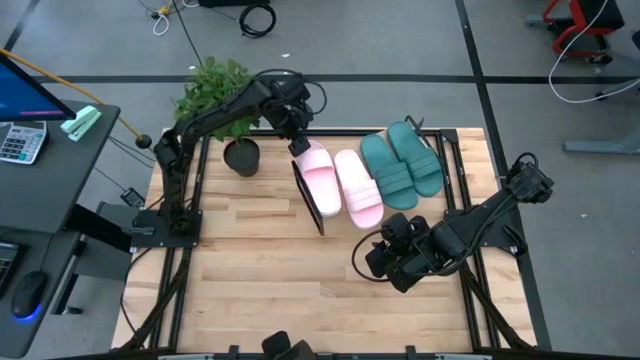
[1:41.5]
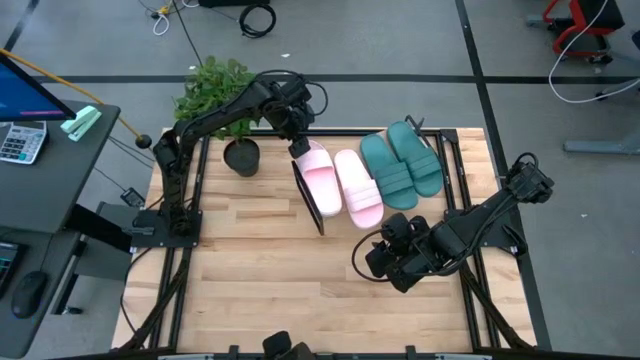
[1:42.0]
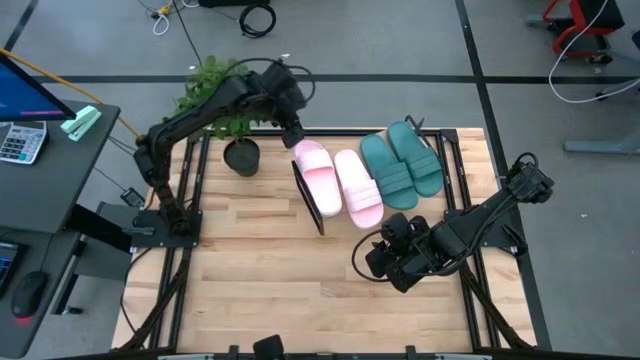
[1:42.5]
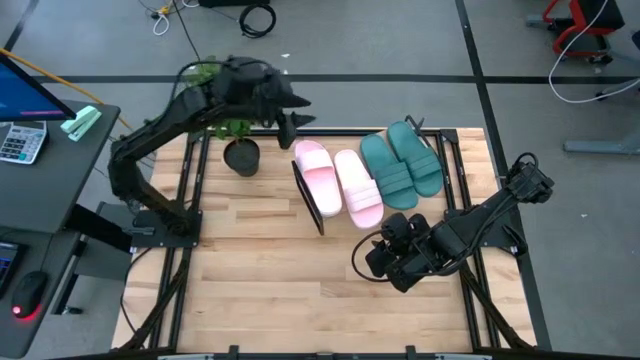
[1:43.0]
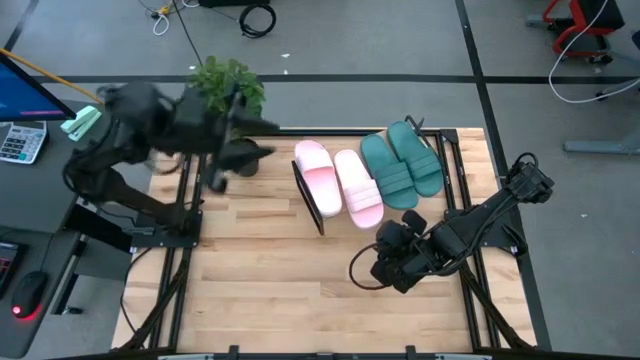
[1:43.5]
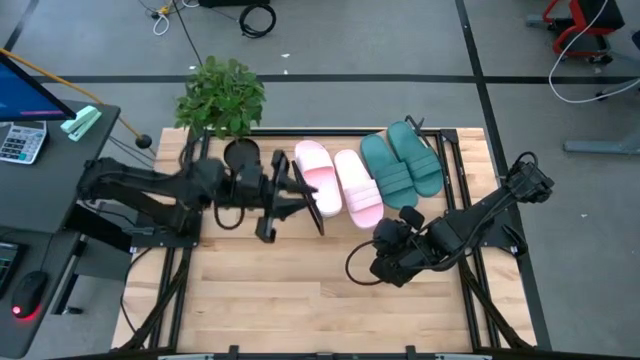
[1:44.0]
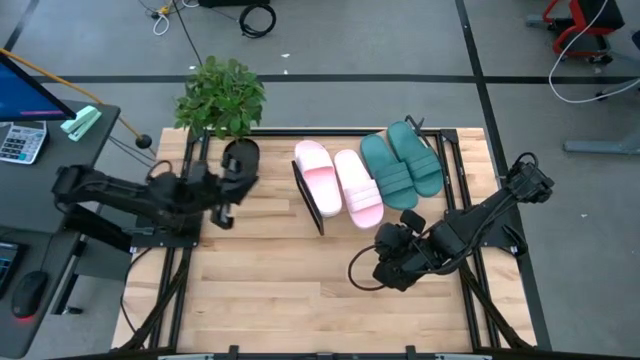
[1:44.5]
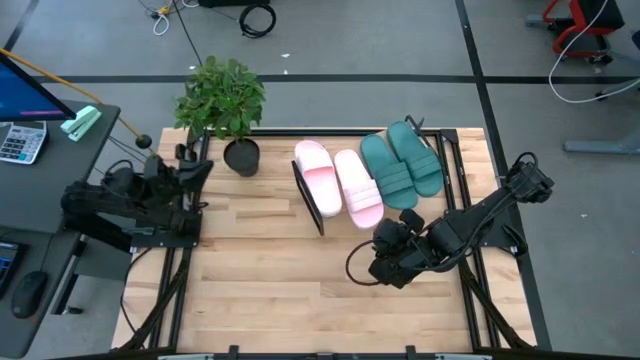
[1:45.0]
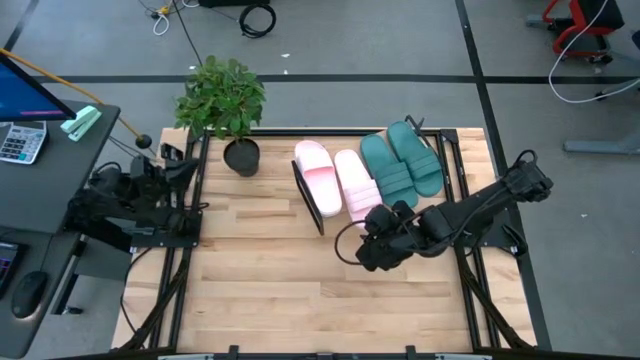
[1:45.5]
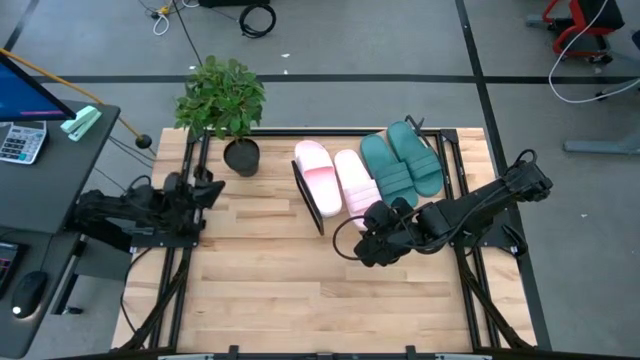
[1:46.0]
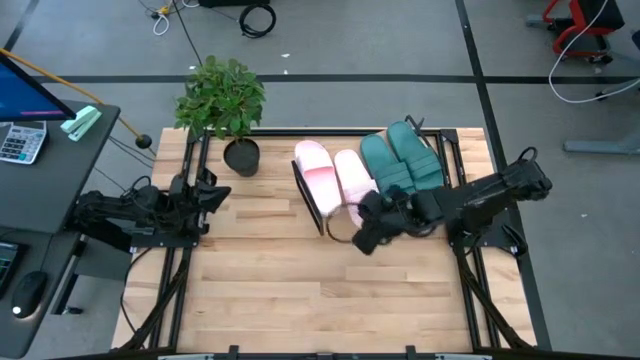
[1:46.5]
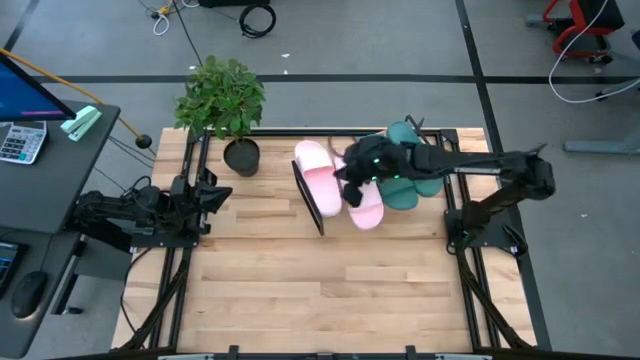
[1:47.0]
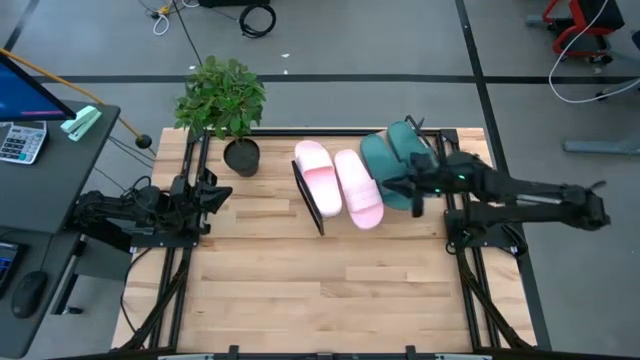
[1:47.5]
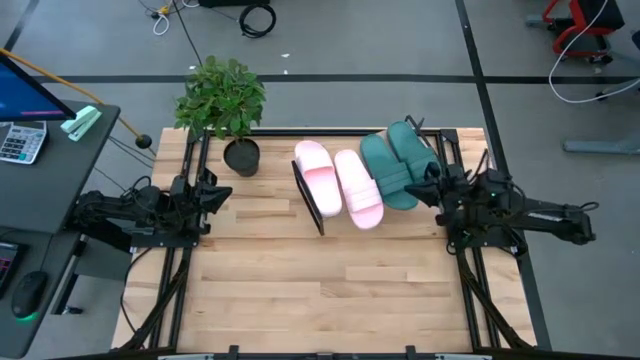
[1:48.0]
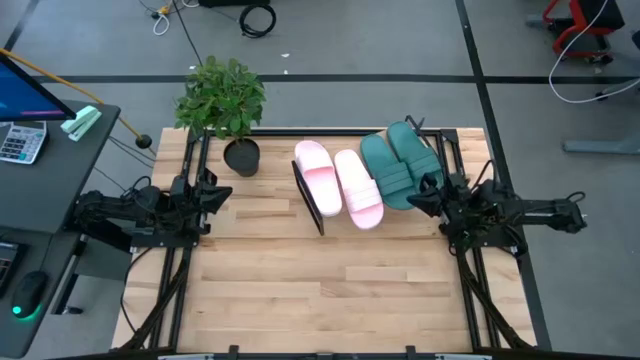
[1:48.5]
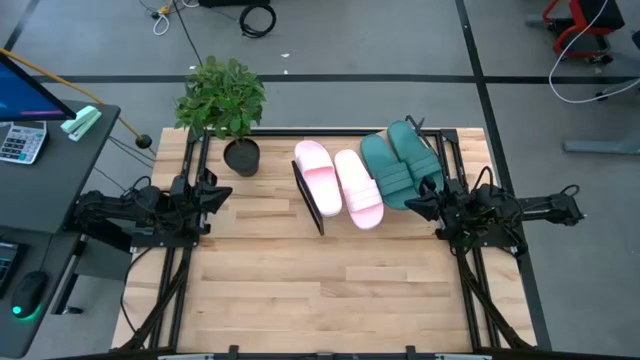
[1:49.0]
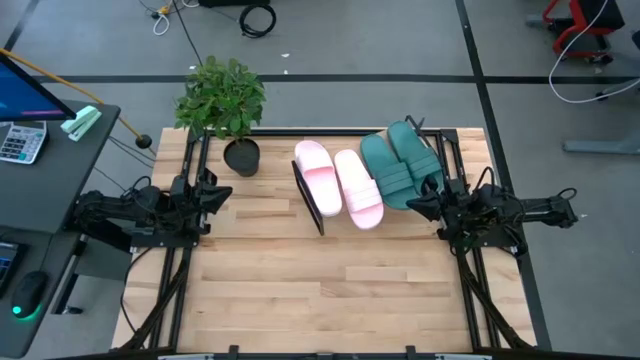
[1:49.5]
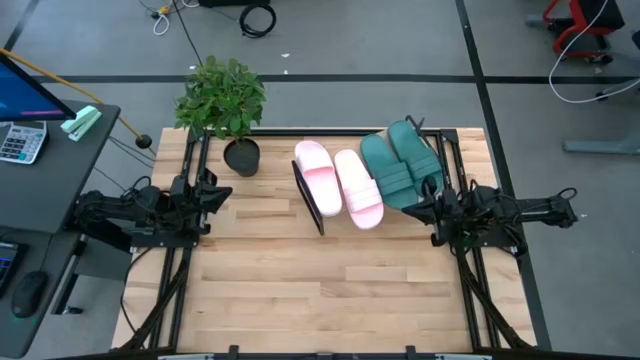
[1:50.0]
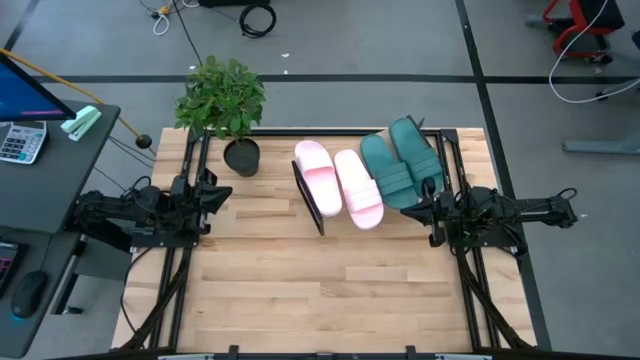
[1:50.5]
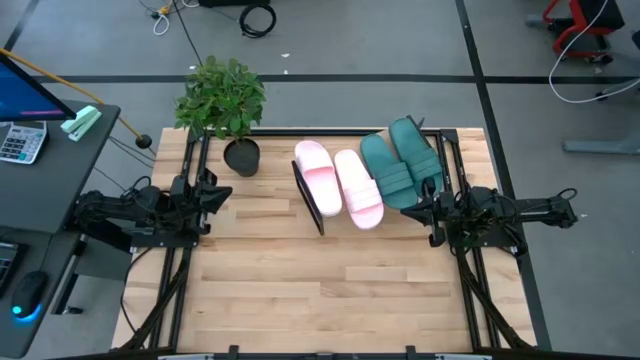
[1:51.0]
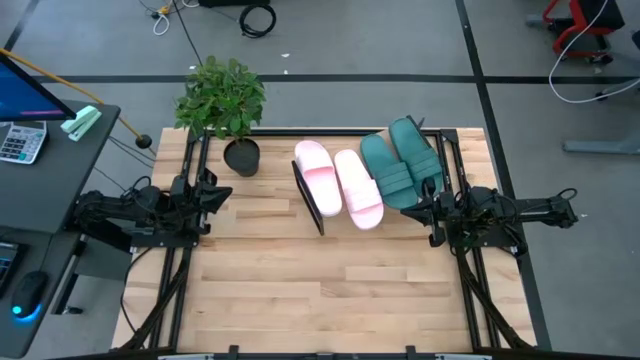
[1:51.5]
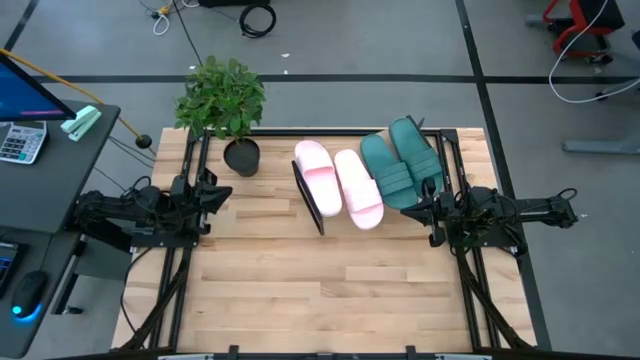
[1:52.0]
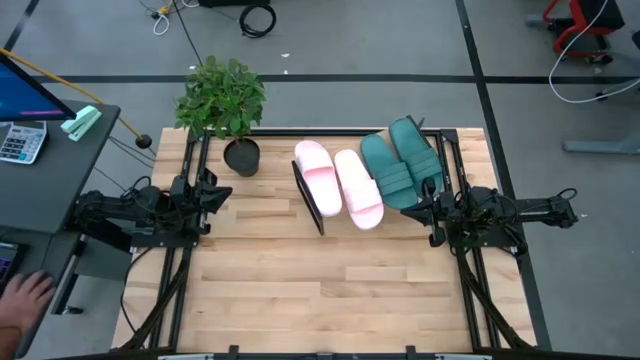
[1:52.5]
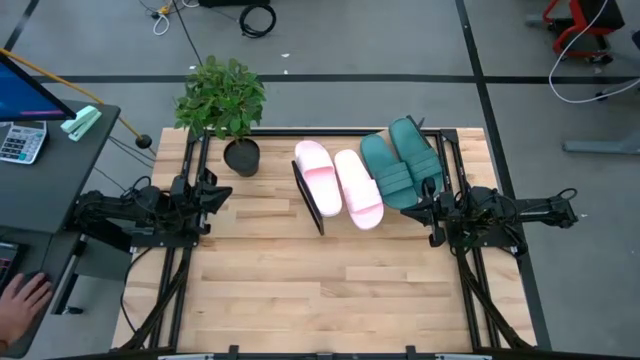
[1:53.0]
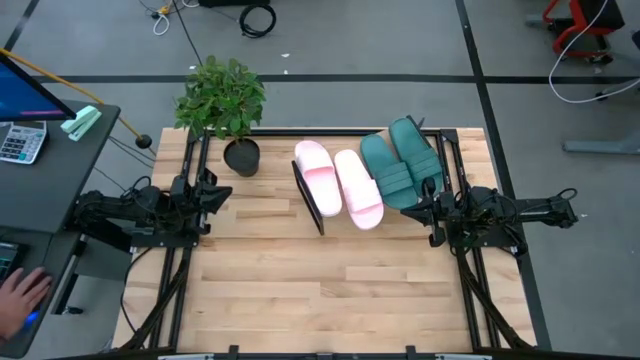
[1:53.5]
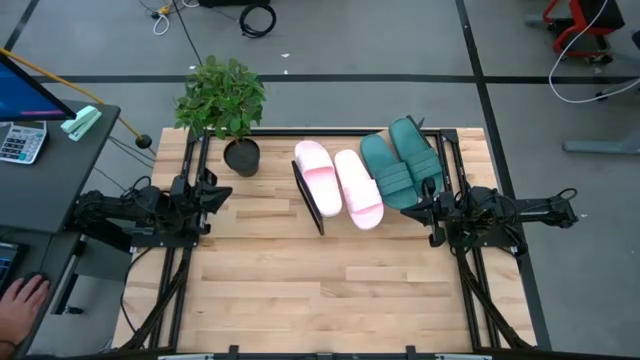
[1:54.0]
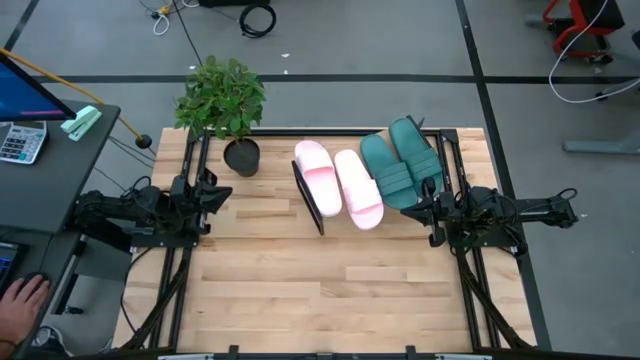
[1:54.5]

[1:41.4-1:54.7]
Task: Pick and place slides into the shelf
Return to Home Position

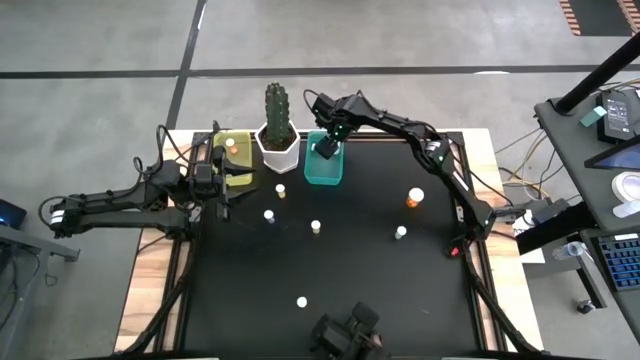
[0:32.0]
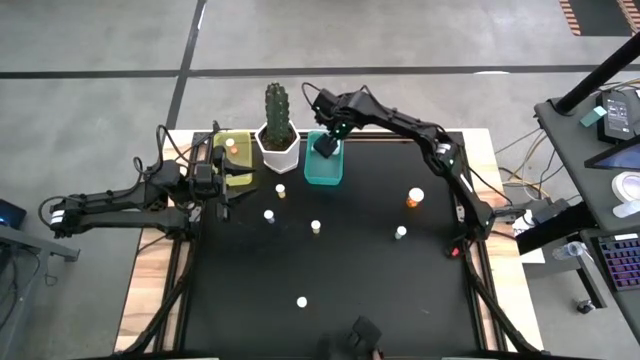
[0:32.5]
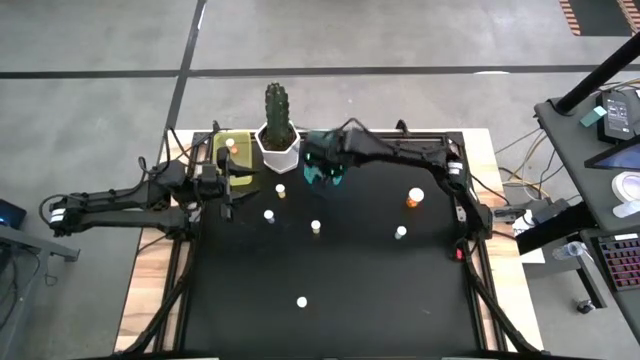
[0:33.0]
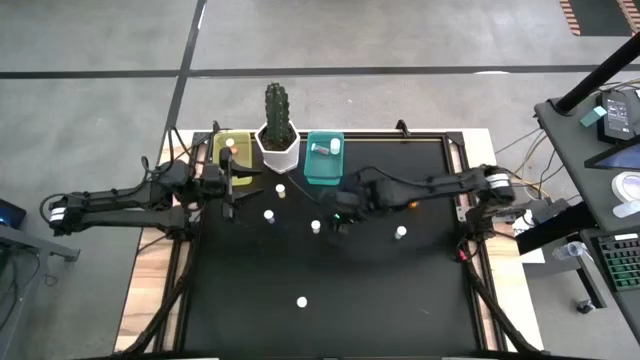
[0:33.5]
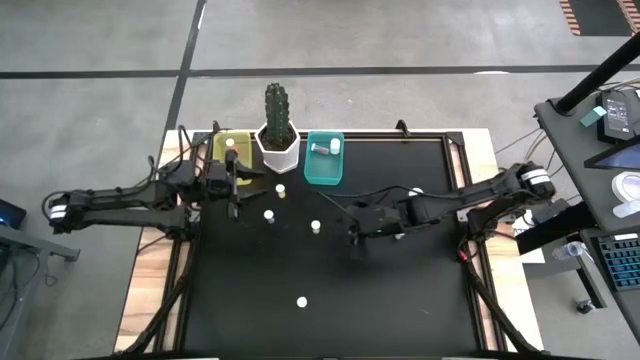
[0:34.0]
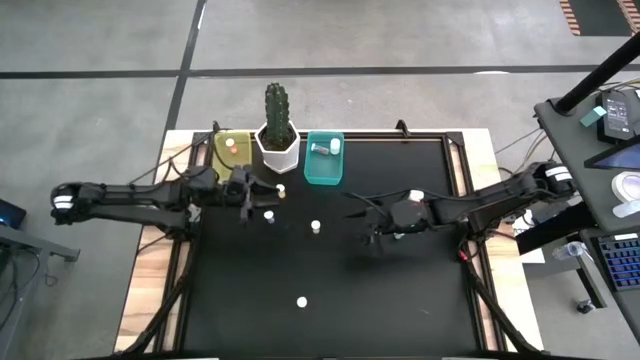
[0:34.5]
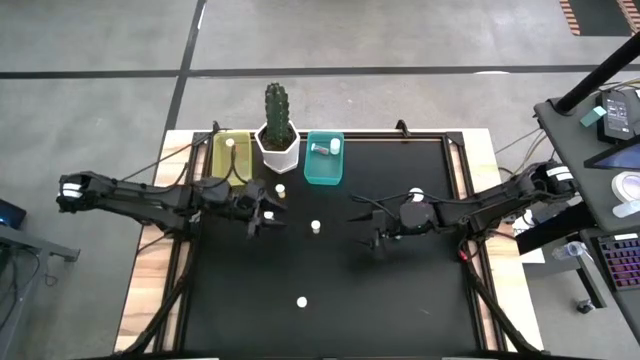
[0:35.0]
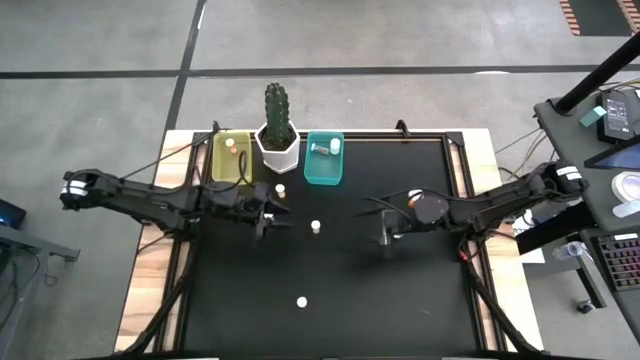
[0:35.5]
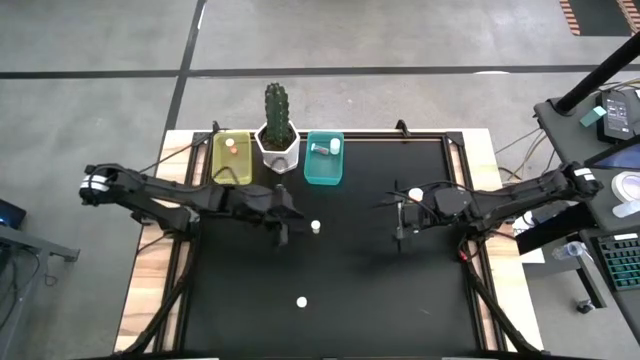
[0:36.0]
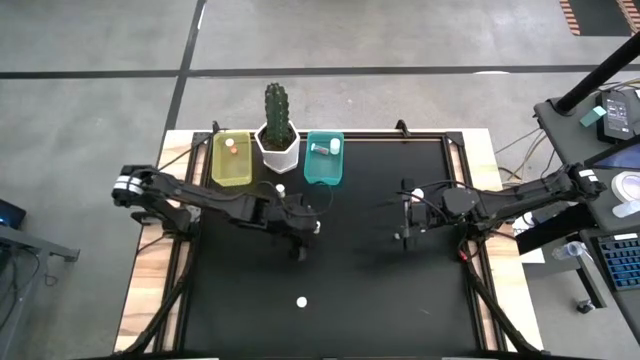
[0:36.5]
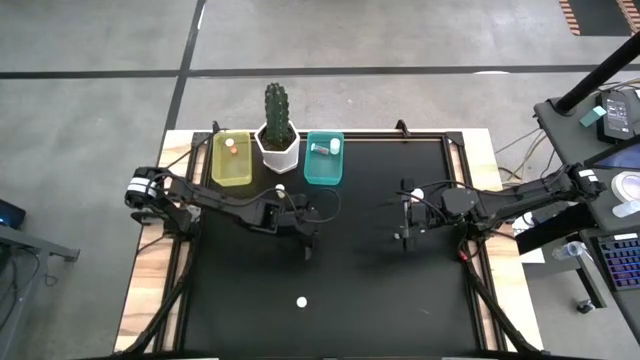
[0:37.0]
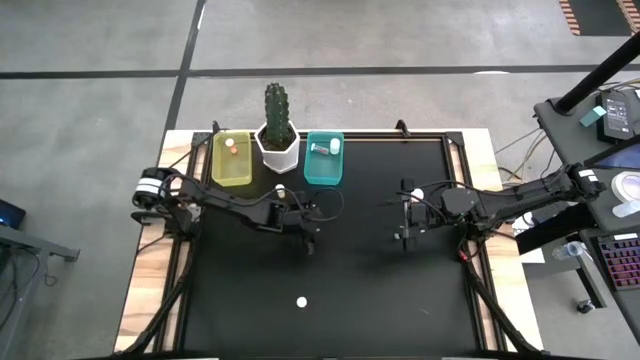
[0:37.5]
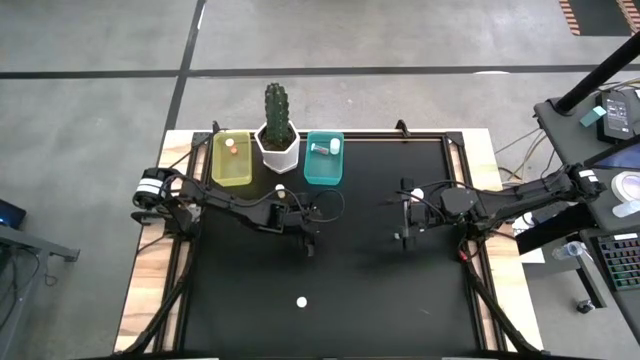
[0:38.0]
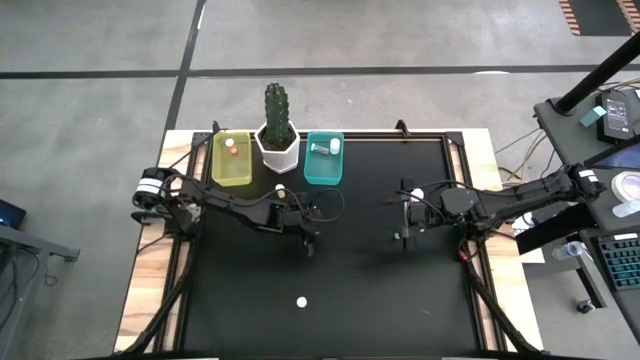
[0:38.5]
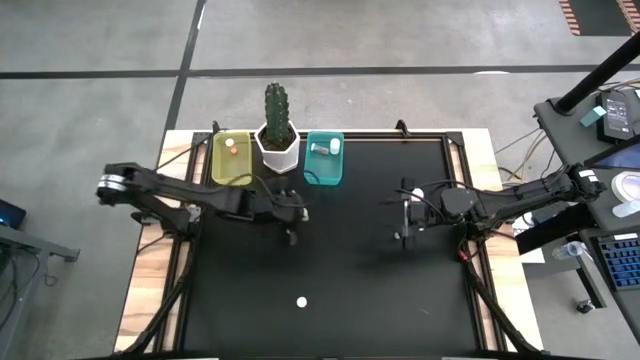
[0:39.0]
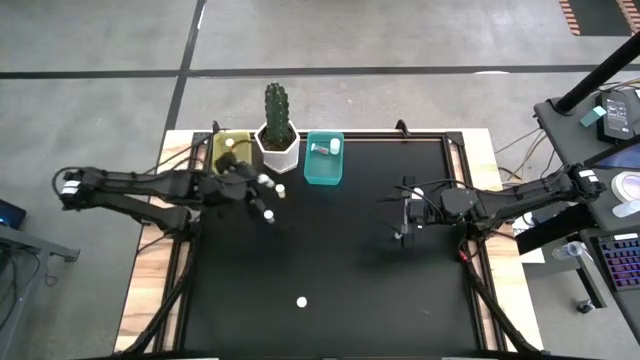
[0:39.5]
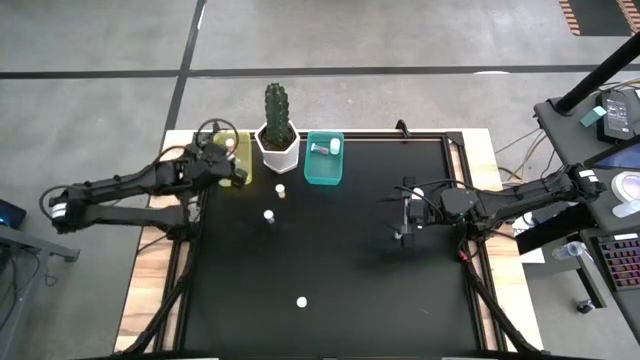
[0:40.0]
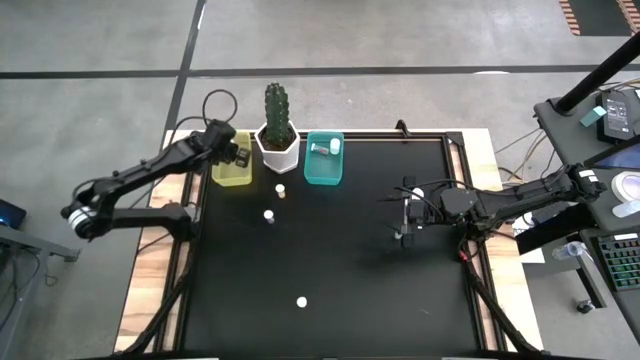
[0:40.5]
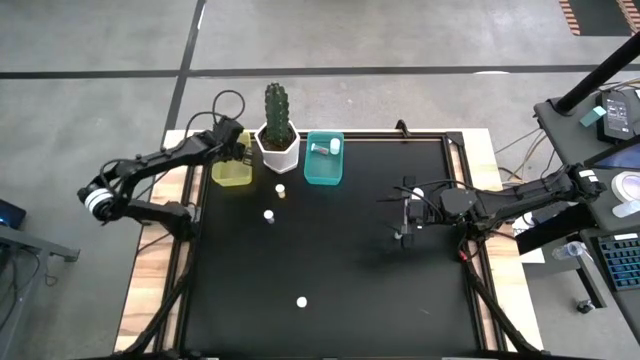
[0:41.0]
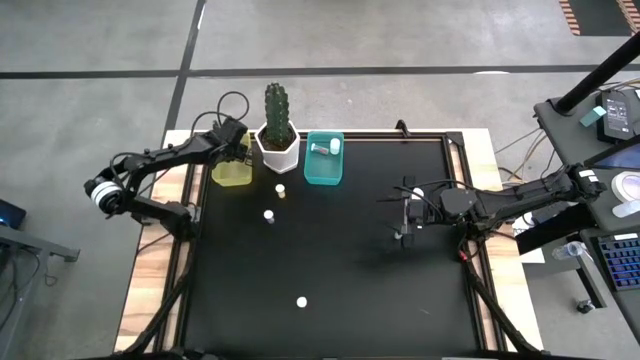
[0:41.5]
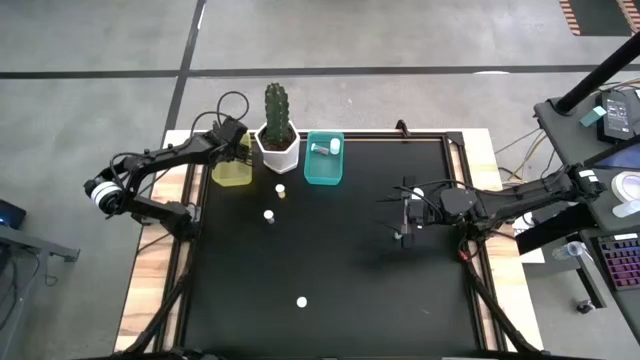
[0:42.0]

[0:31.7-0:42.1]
Task: Pick and place medicine bottles into bin by pill shape (circle, oval)
Put the yellow tablet bottle into the yellow bin
